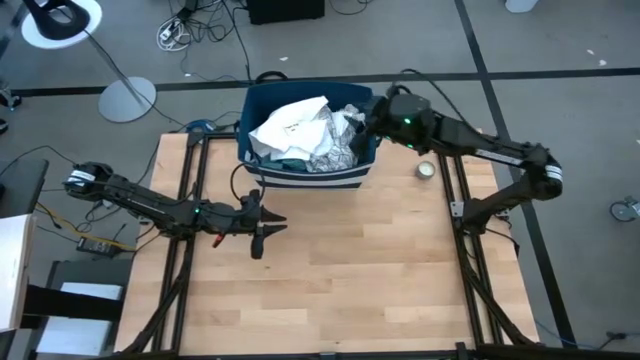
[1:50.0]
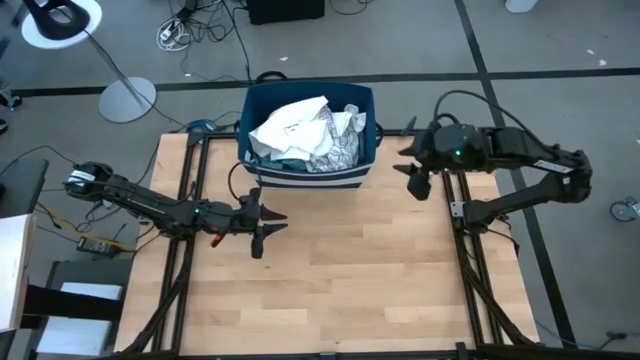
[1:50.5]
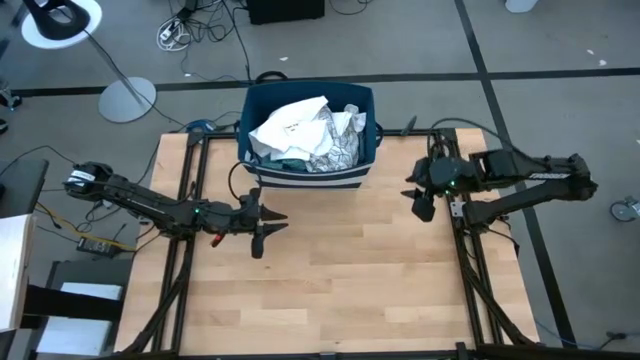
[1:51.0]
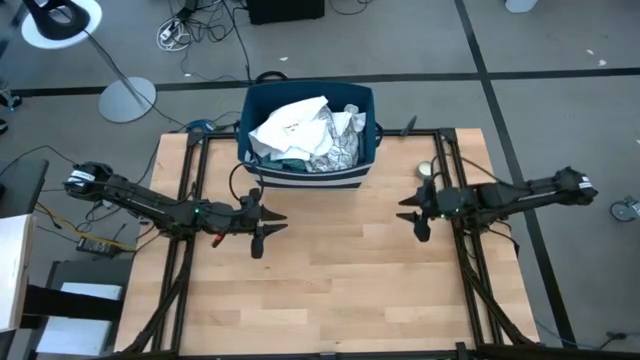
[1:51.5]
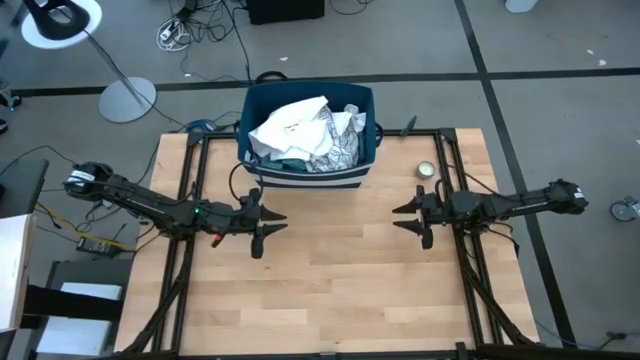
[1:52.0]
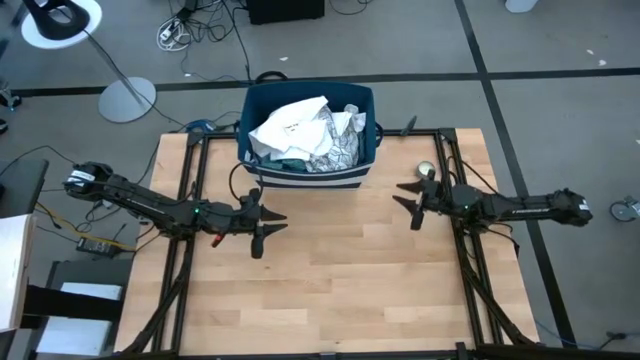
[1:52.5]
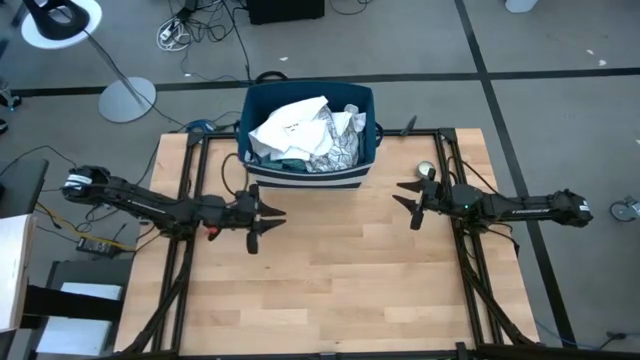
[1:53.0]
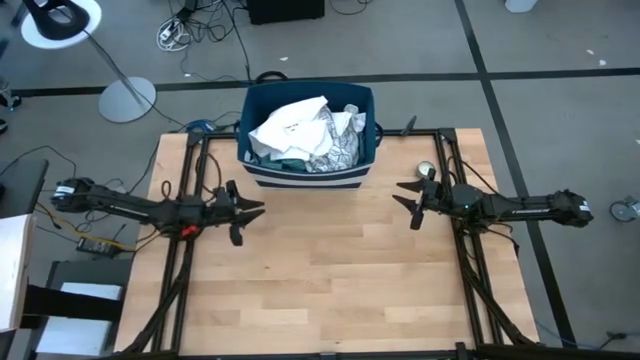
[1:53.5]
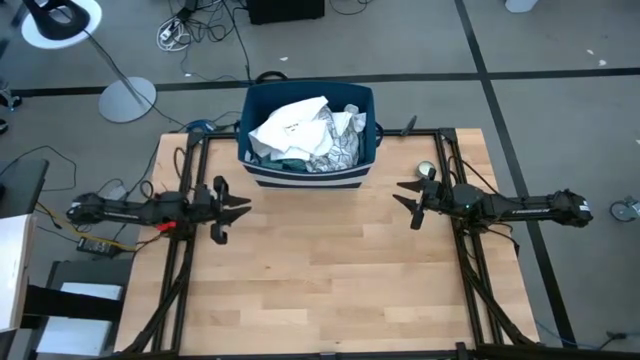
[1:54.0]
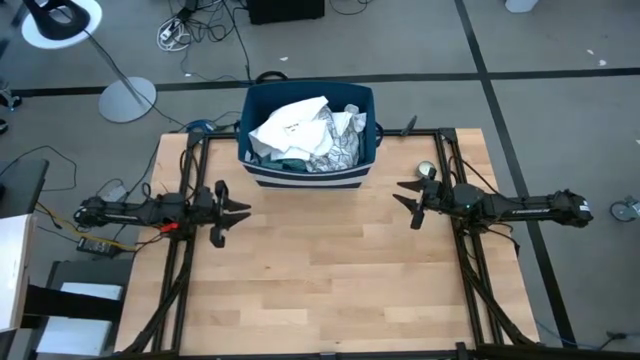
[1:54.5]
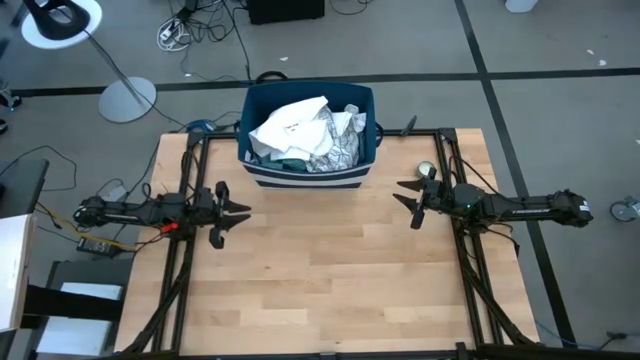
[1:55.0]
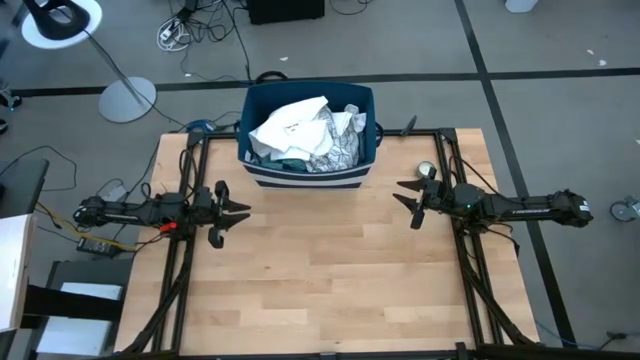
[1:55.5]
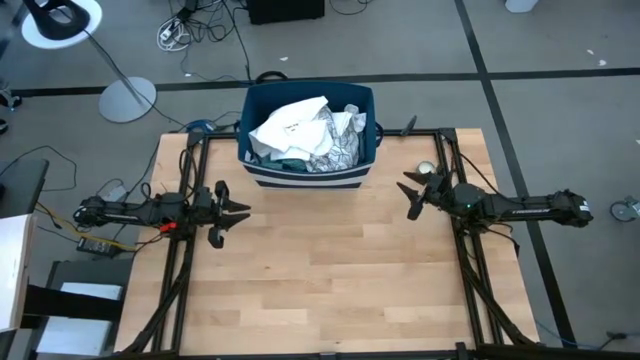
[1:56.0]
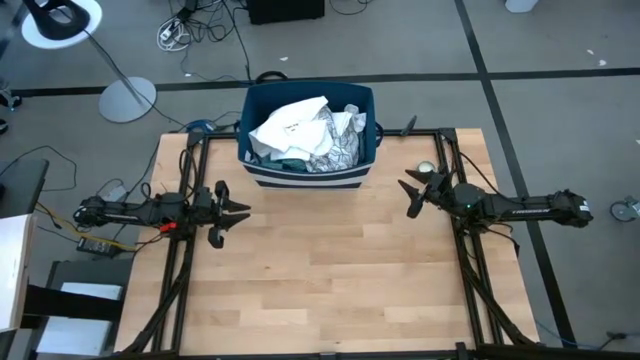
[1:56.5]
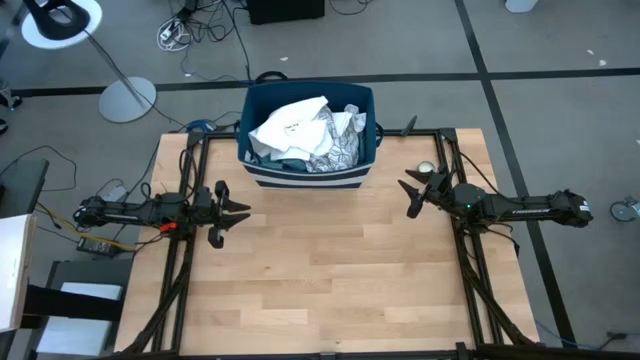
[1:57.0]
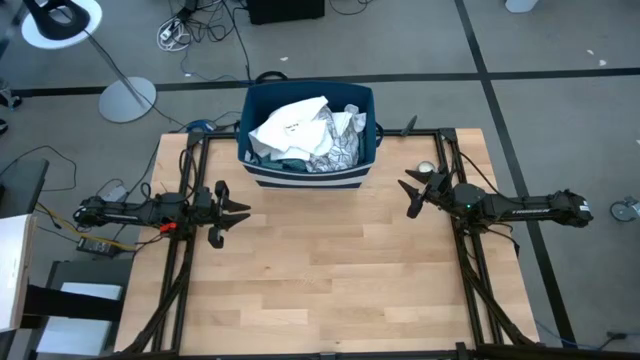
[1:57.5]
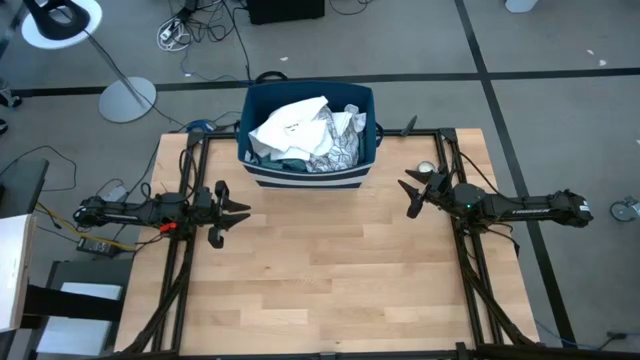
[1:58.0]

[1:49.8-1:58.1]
Task: Sort clothes
Return to Home Position

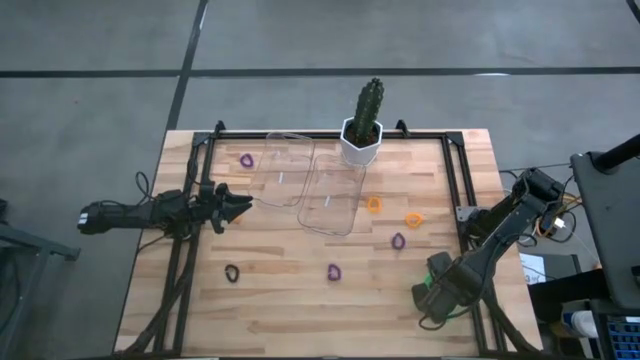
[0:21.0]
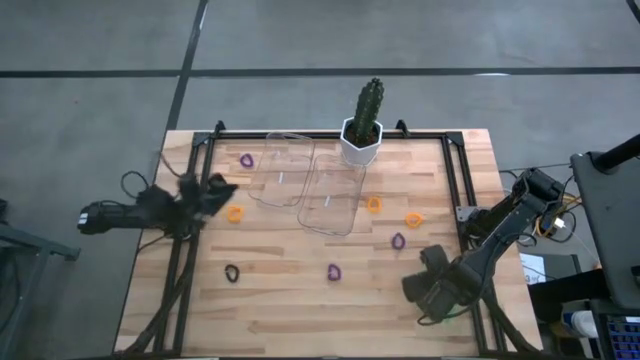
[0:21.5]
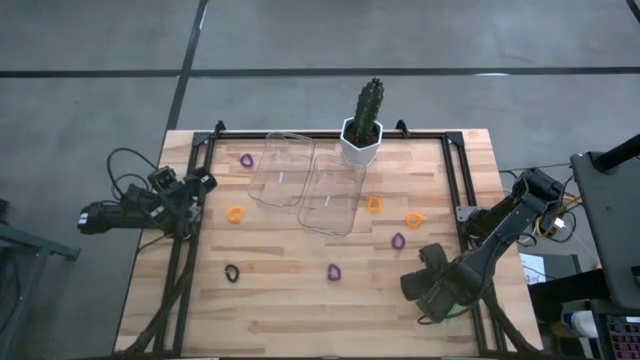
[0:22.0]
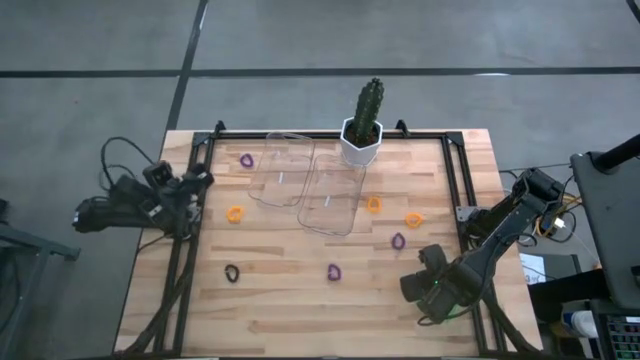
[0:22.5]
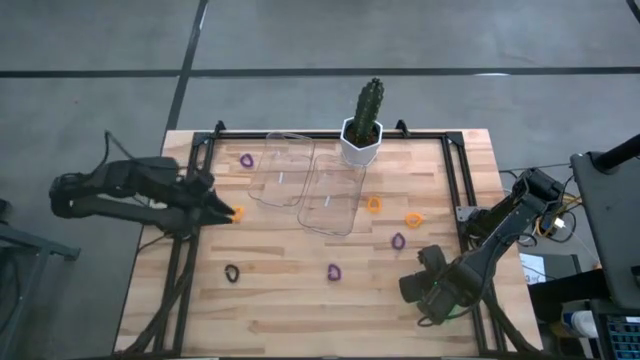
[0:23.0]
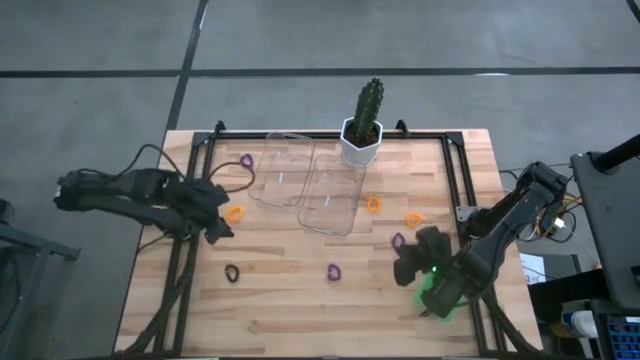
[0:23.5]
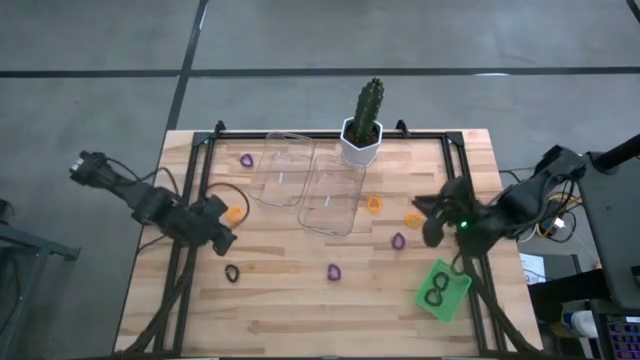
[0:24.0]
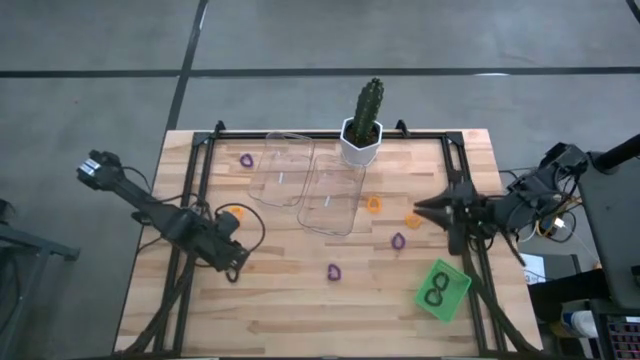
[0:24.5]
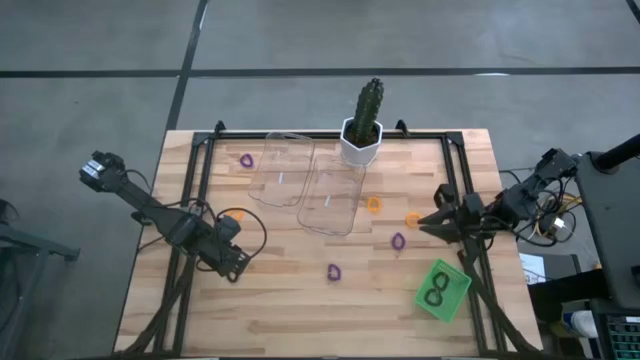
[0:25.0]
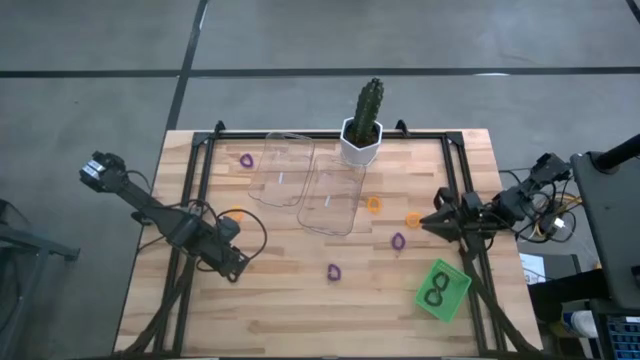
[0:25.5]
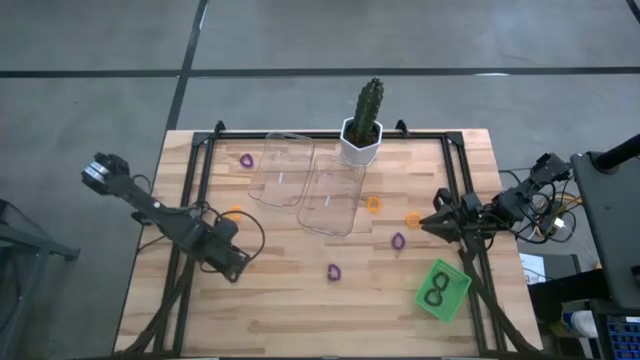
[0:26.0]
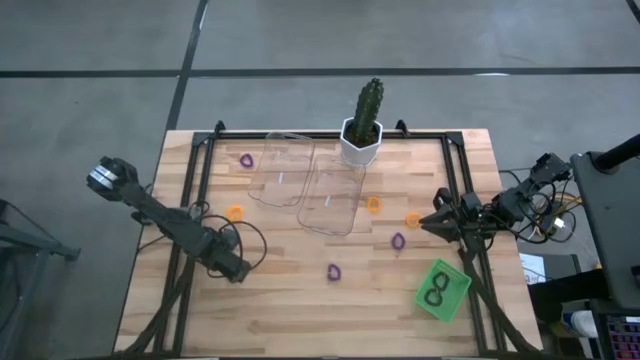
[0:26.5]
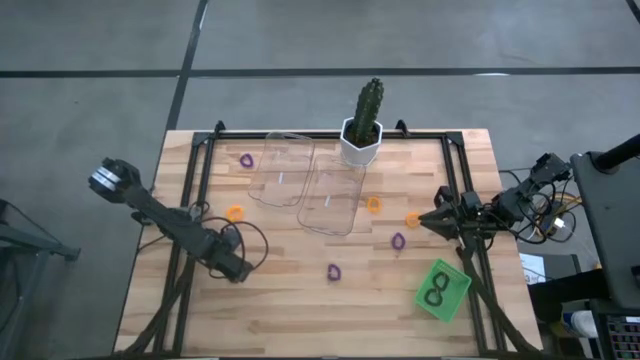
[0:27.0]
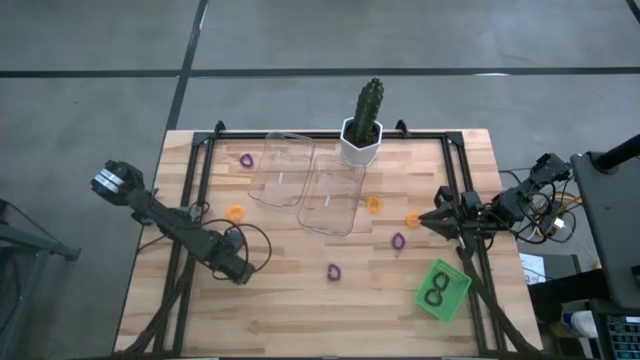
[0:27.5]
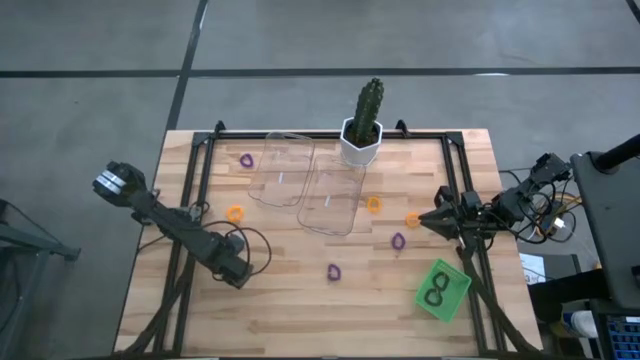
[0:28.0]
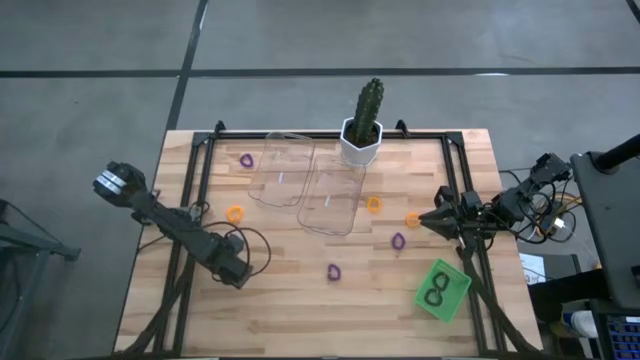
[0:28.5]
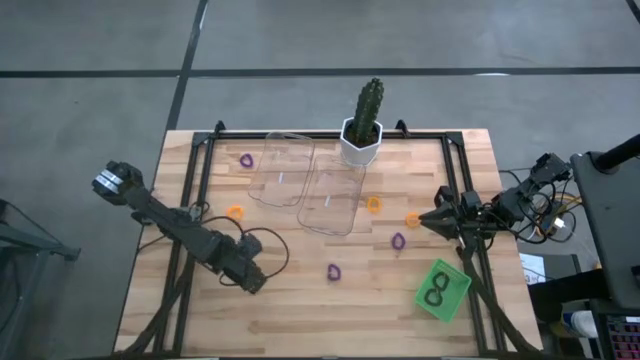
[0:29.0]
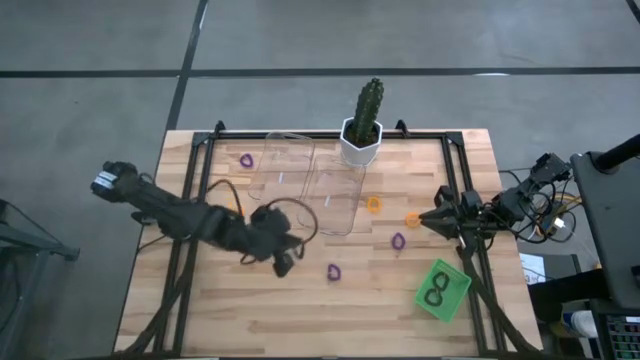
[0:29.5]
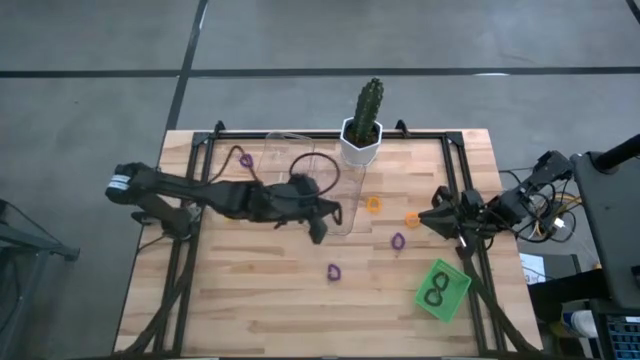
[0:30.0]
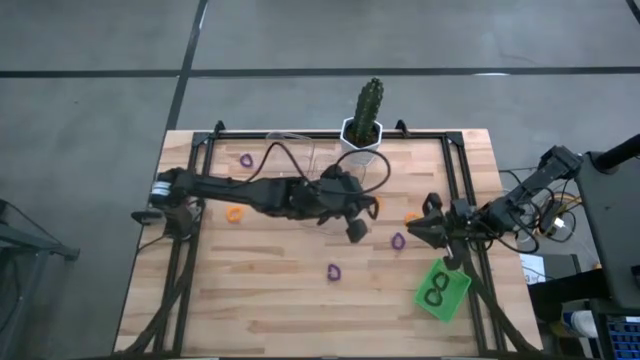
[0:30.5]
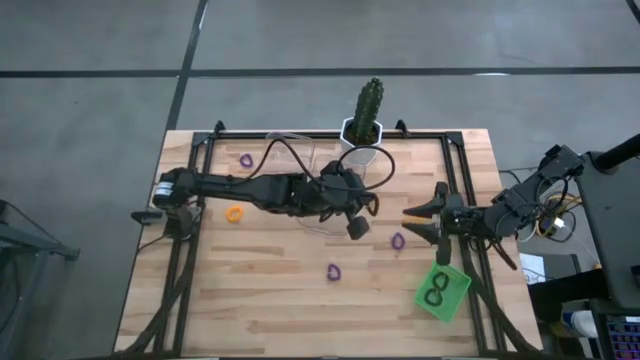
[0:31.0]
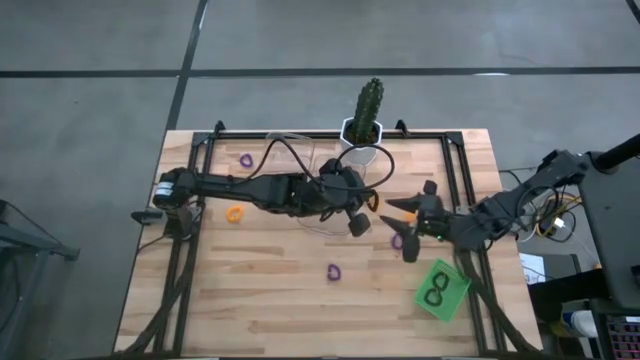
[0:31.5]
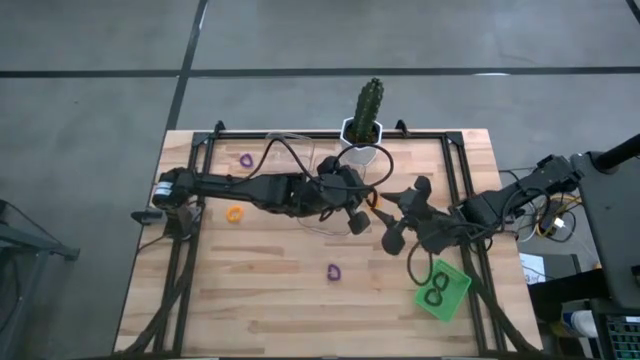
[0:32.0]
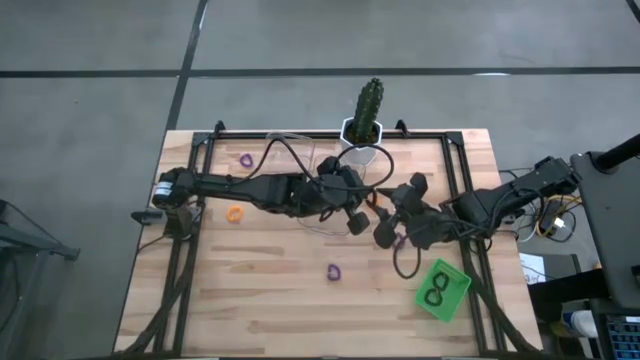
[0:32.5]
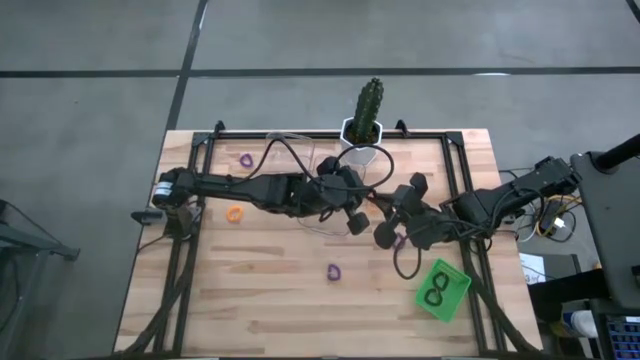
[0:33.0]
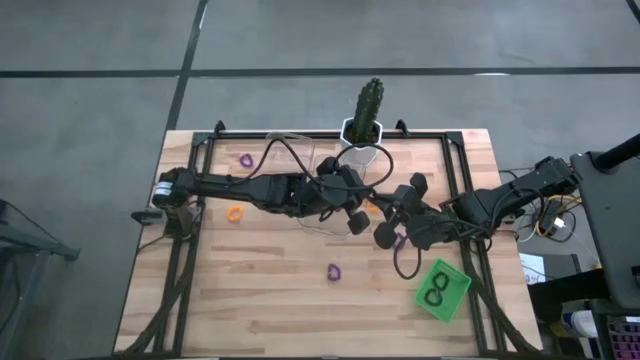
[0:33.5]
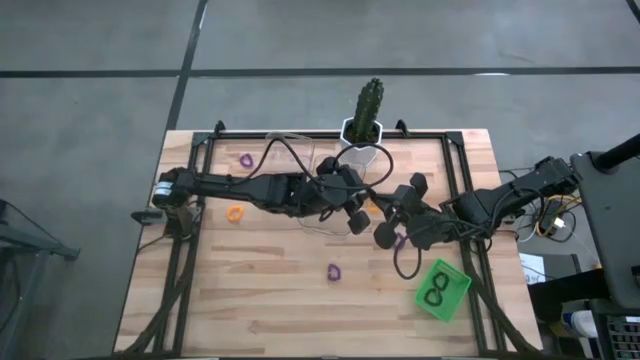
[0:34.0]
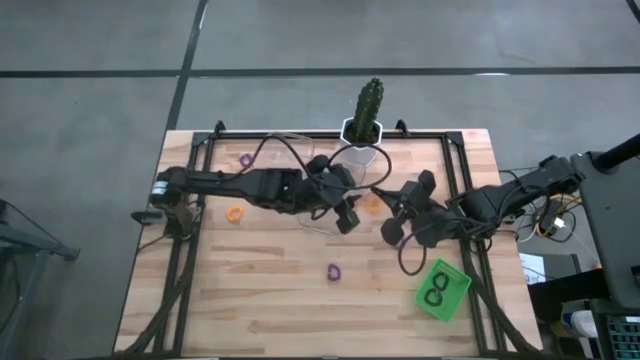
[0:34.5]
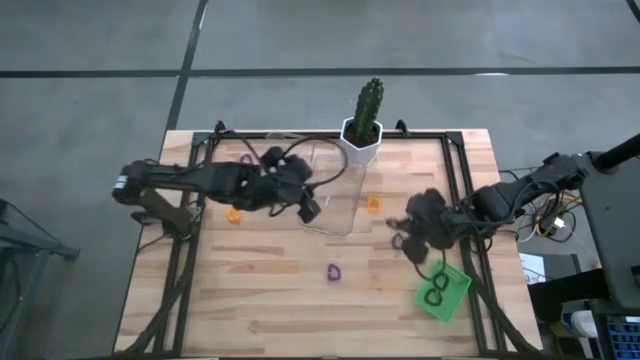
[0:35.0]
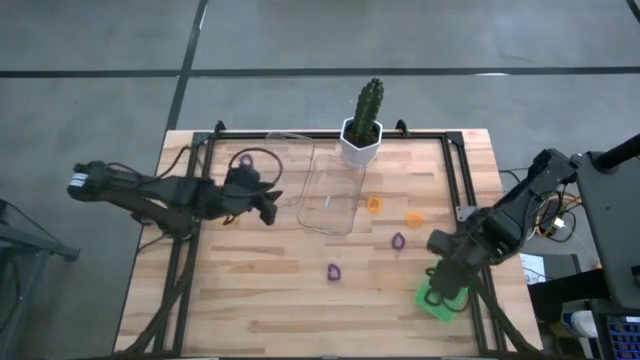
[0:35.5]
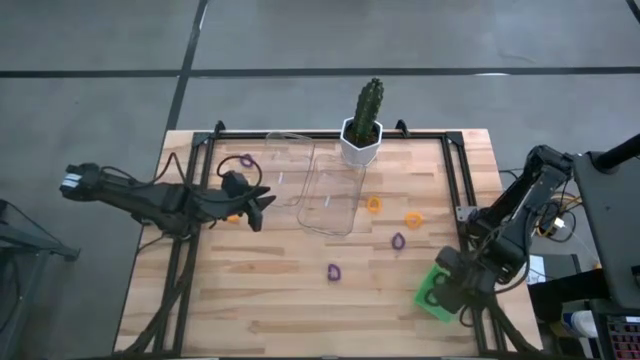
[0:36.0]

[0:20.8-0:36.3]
Task: Sort spring keychains
Put the black spring keychain into the green basket
